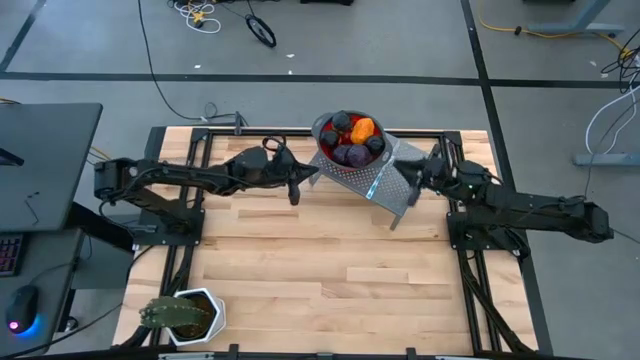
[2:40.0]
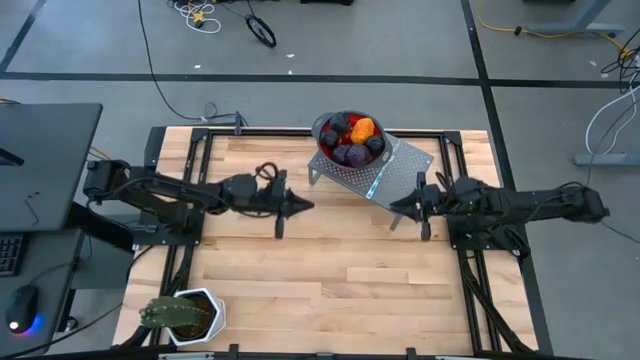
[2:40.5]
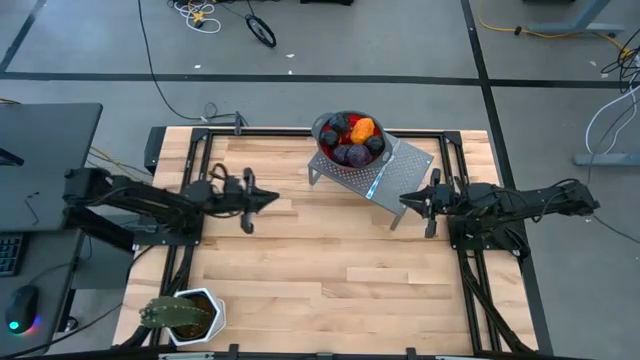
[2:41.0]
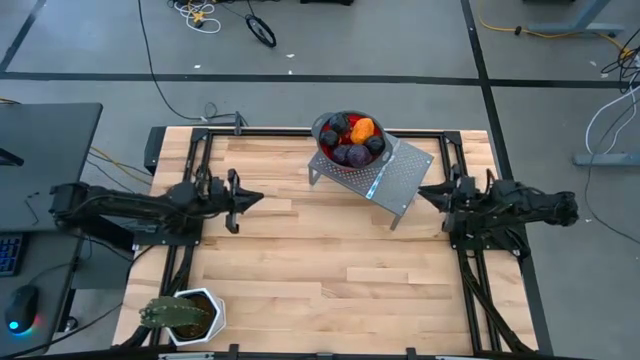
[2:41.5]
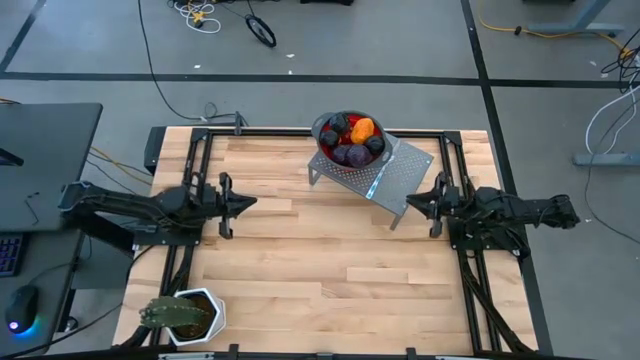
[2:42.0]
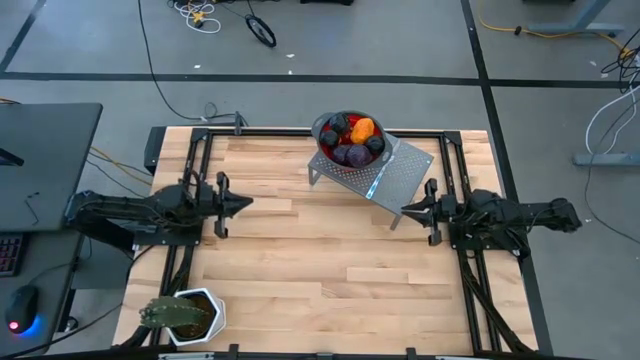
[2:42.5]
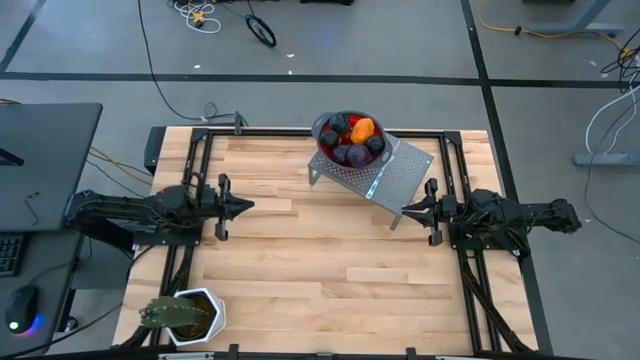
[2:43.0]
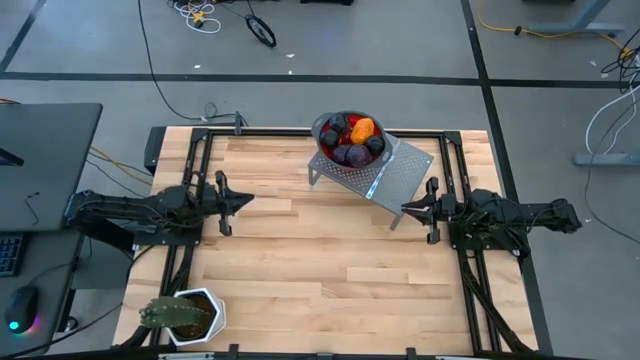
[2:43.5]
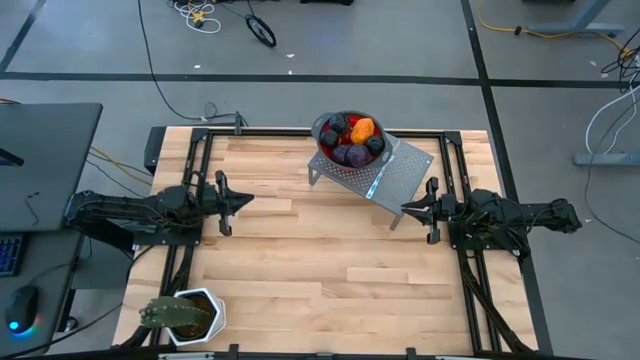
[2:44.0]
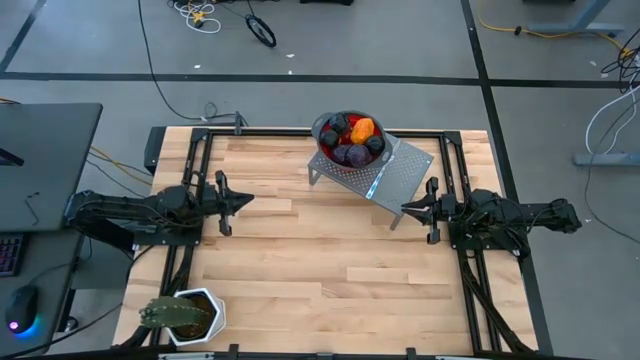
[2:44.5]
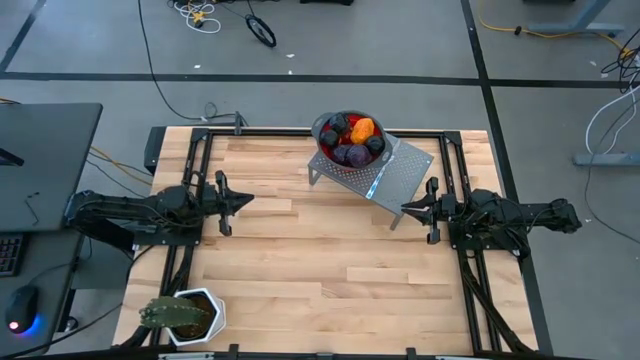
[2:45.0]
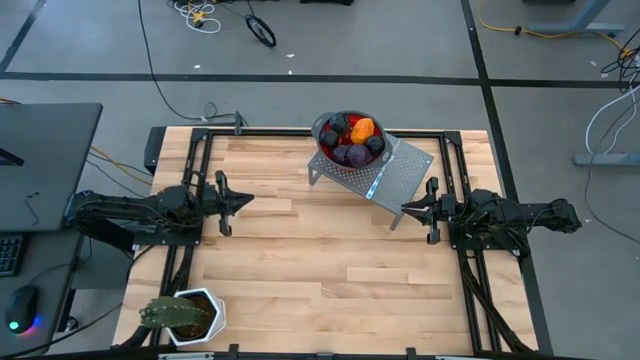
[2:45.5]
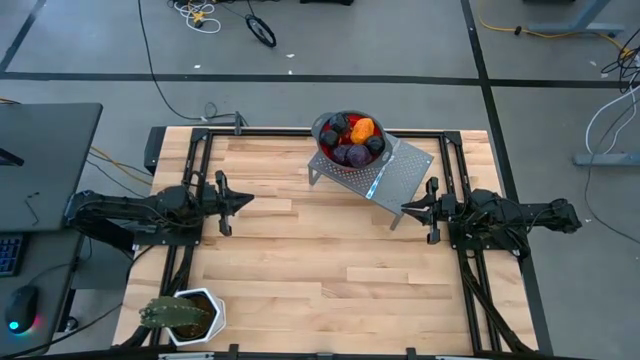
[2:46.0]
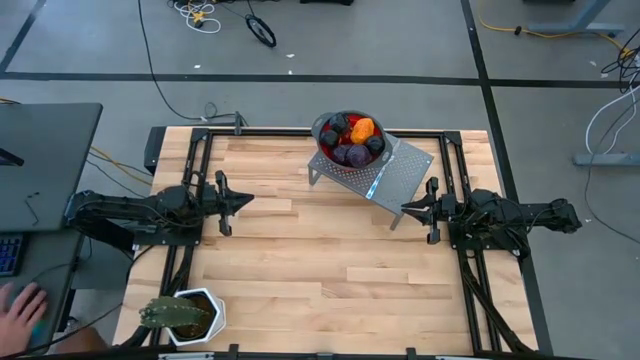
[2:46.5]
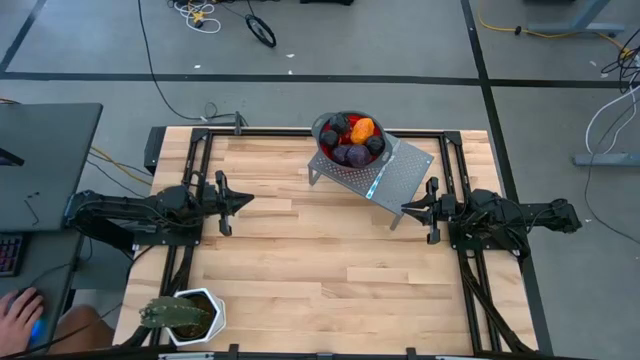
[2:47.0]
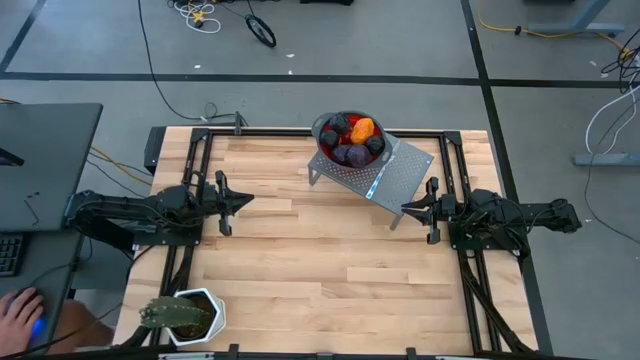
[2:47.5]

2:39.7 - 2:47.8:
Task: Pick & Place Fruit
Return to Home Position

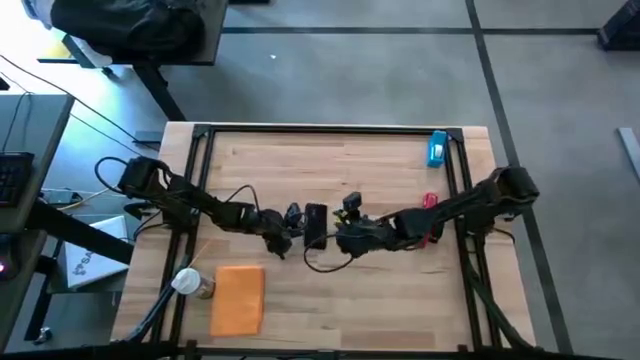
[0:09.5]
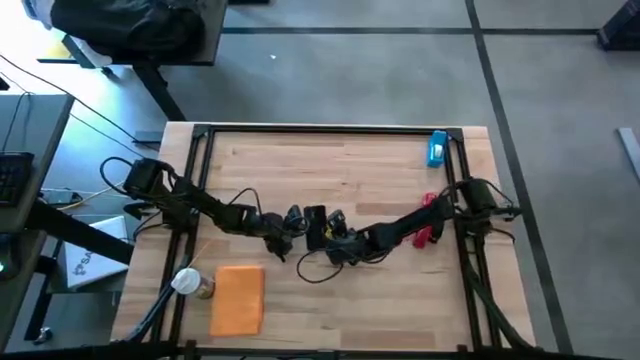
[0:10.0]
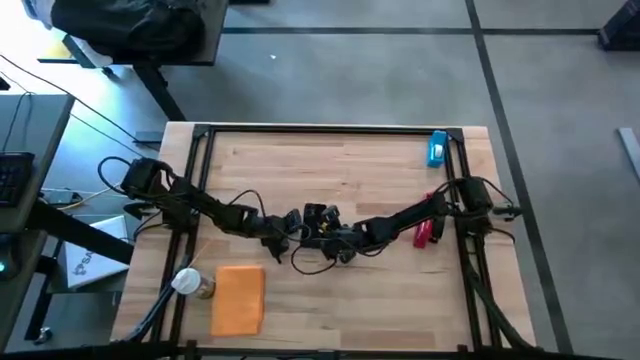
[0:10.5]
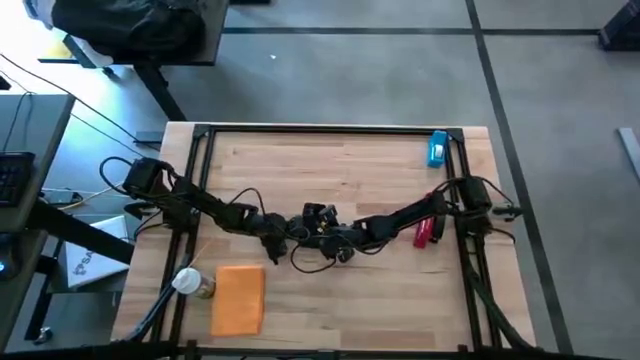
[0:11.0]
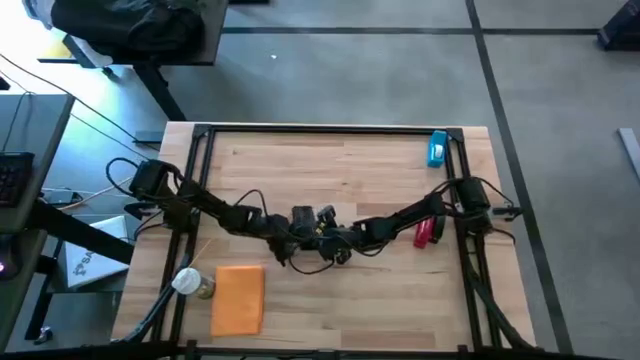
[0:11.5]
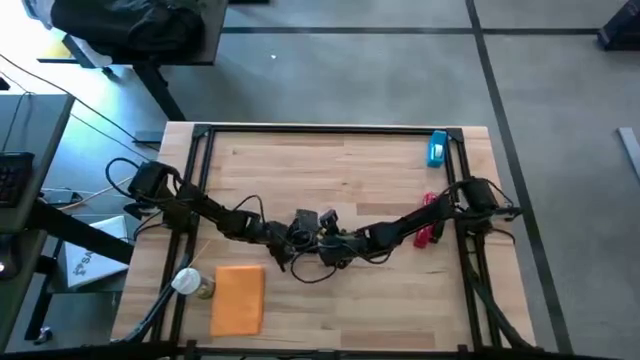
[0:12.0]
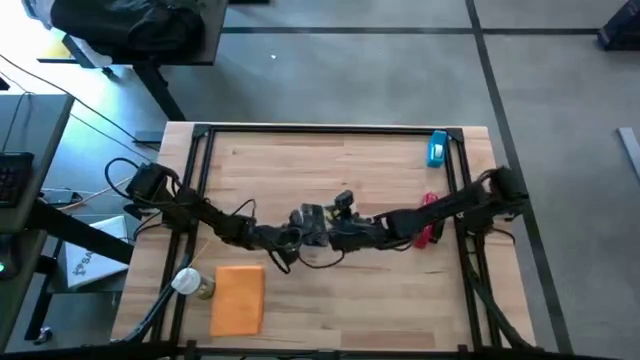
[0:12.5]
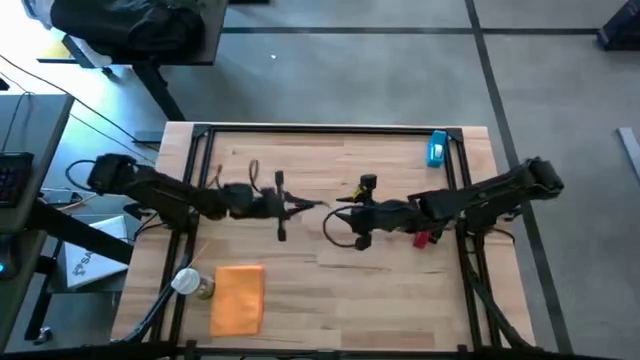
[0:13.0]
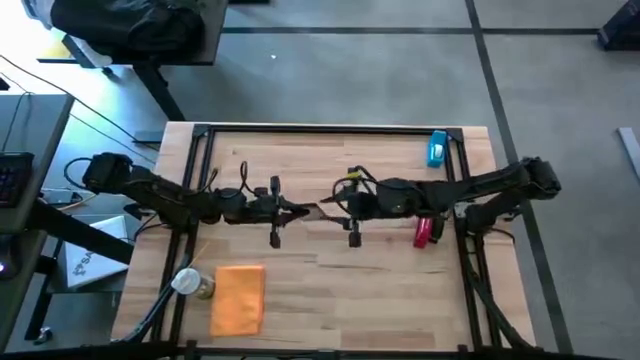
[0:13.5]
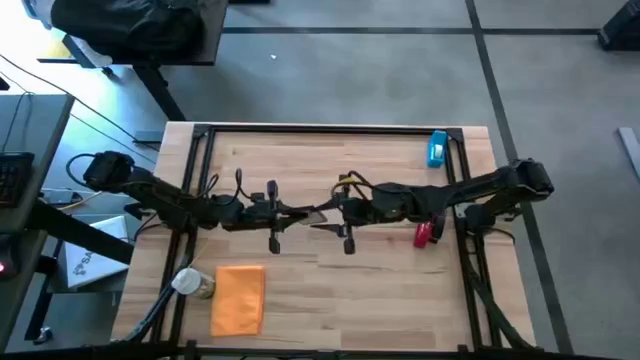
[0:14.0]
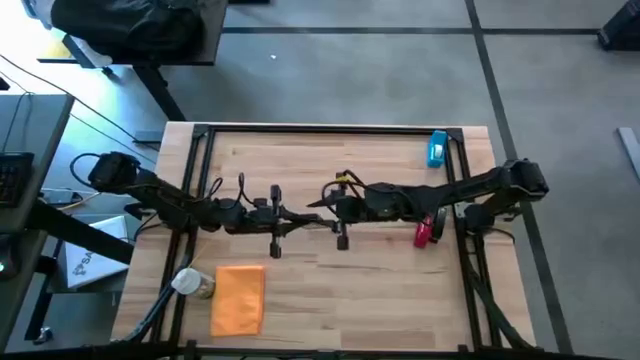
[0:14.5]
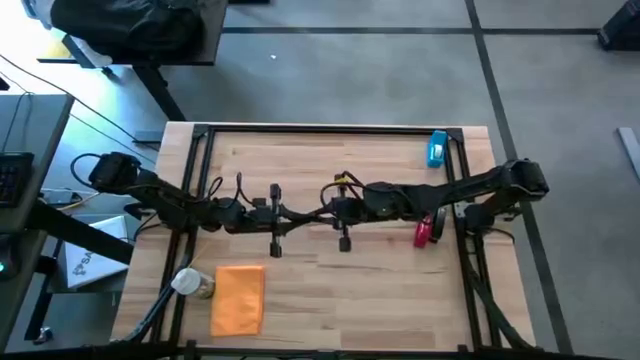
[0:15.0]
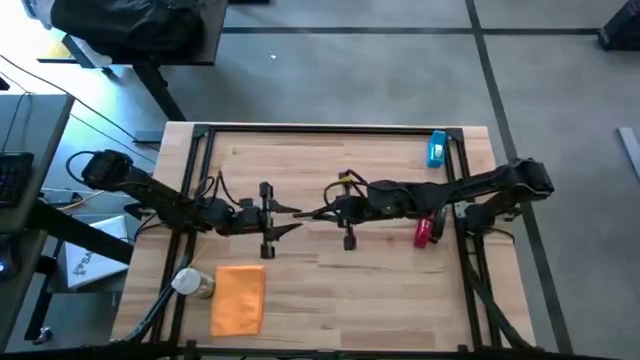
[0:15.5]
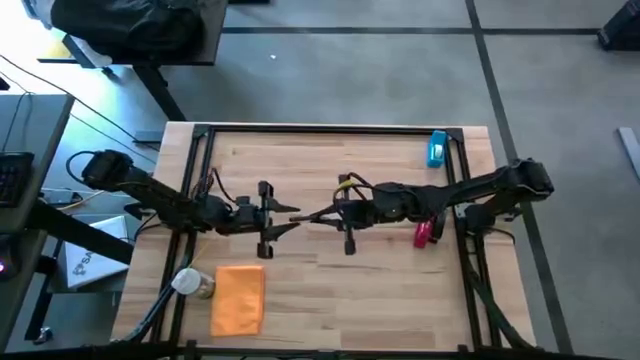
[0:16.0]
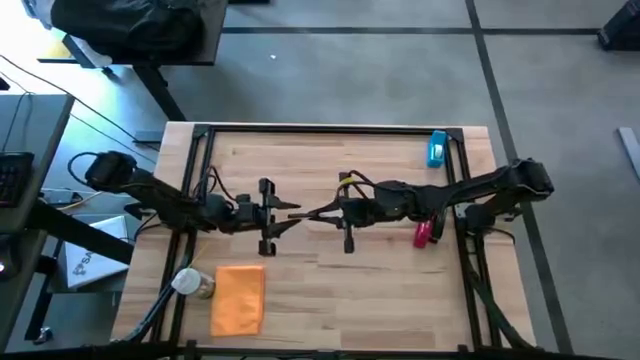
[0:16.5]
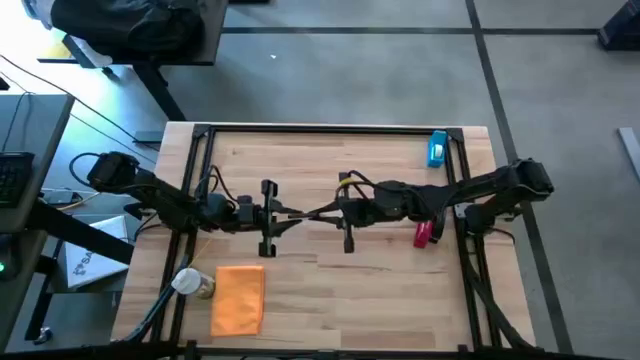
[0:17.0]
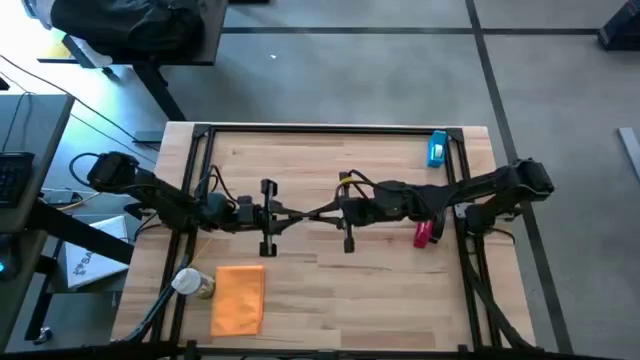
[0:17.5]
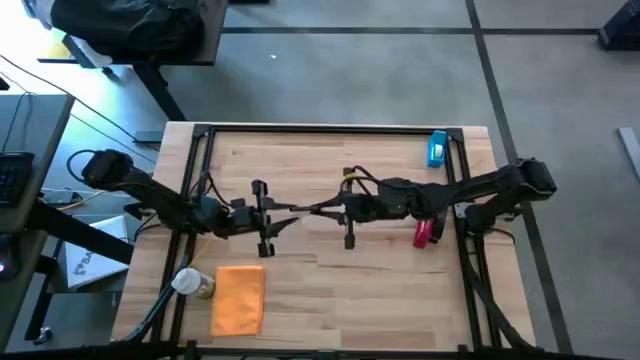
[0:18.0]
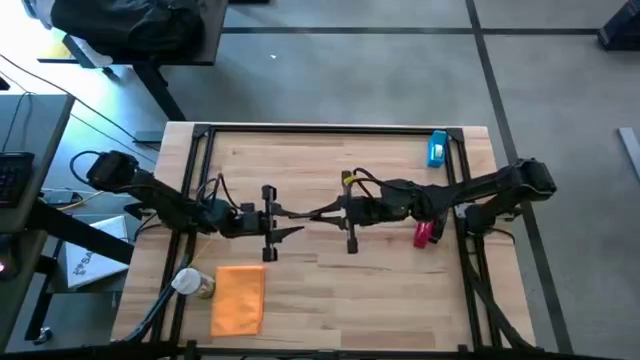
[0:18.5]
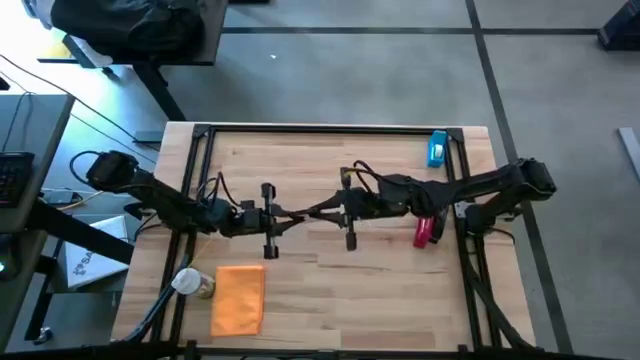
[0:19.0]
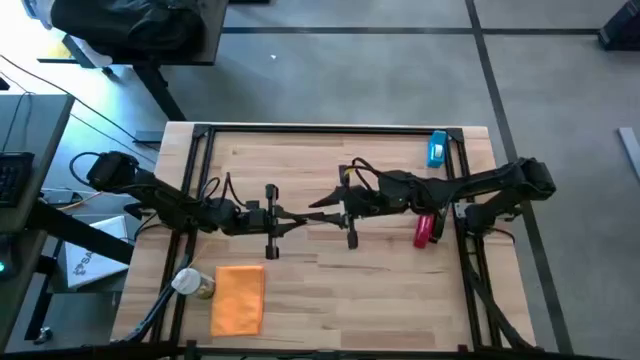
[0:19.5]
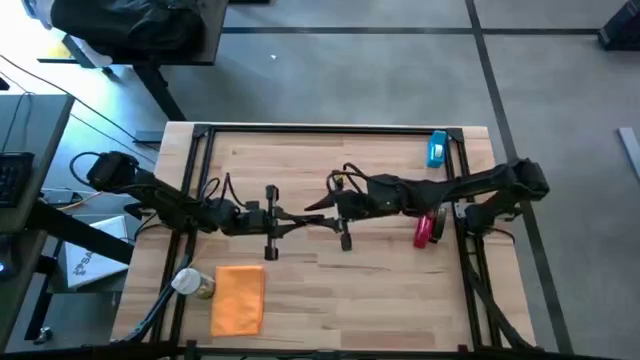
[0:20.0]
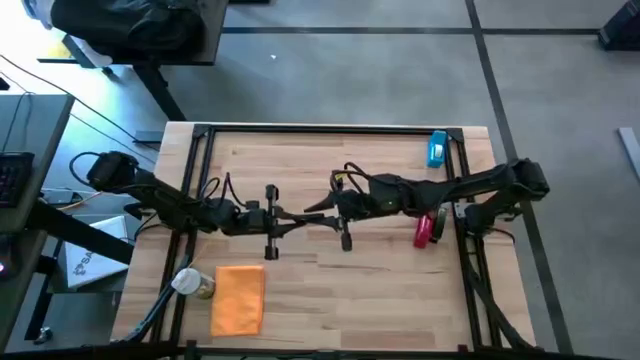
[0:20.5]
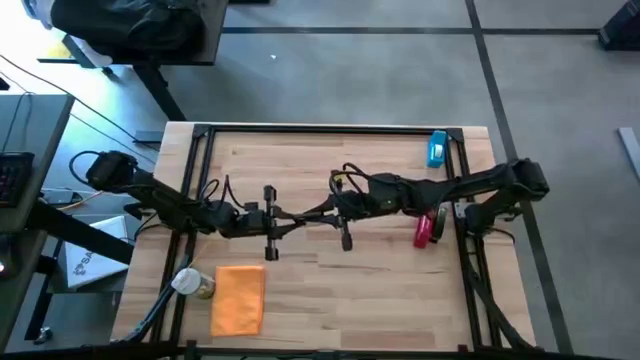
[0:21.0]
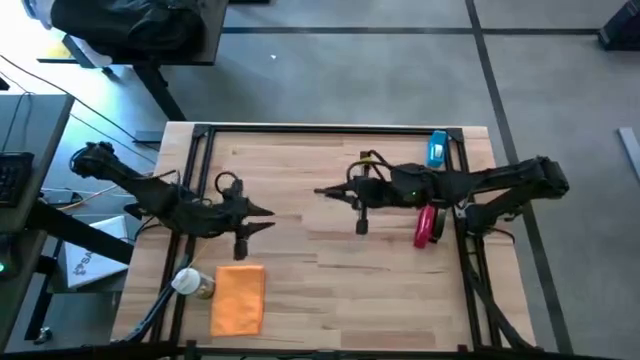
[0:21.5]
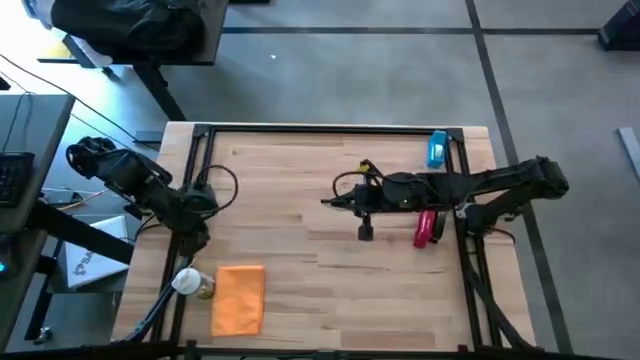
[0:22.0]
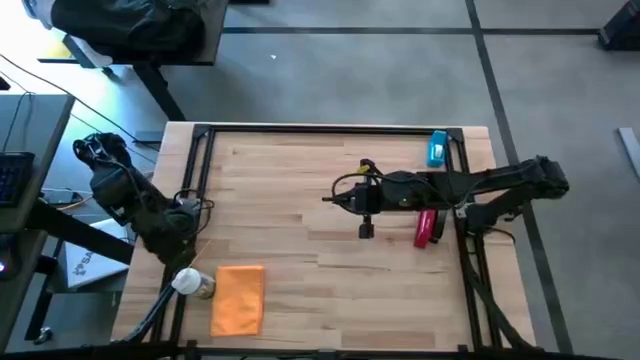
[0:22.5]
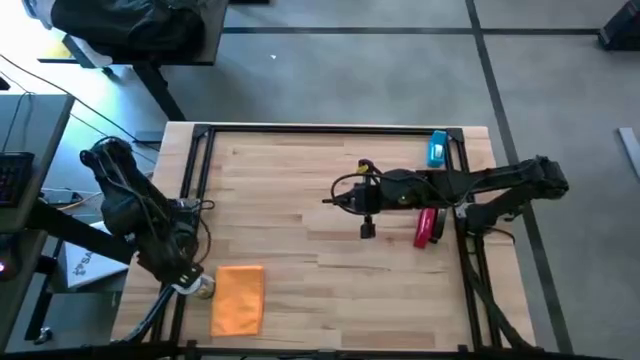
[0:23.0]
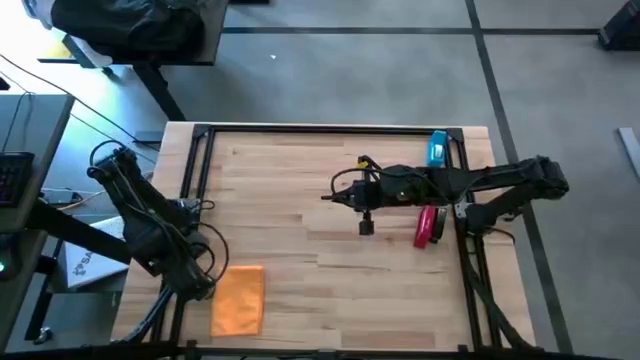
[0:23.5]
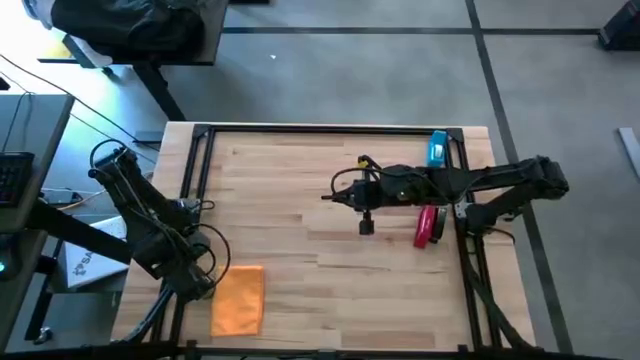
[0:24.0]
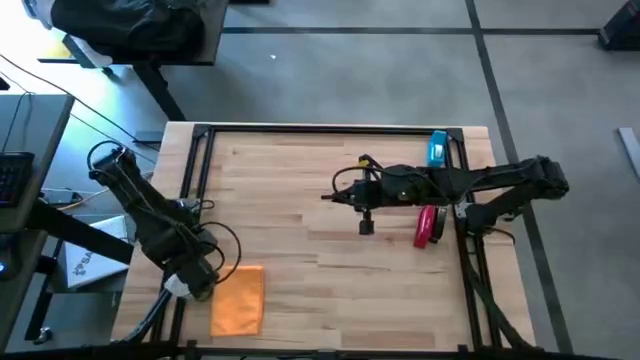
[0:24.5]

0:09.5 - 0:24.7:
Task: Apply microfiber cloth
Spray the black cellphone using the spray bottle
